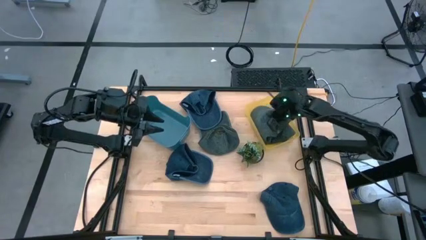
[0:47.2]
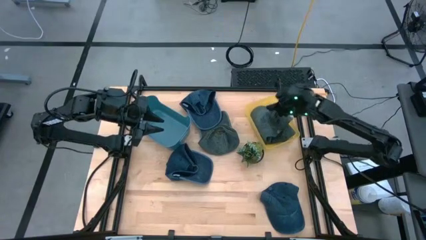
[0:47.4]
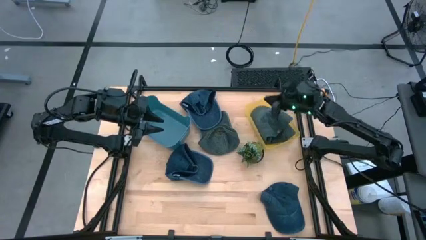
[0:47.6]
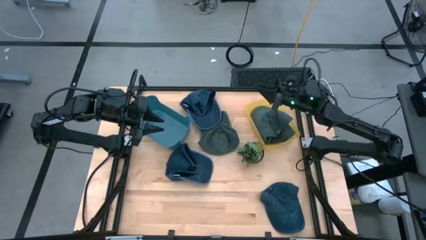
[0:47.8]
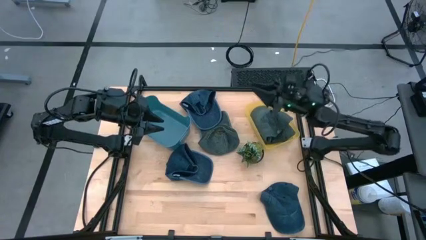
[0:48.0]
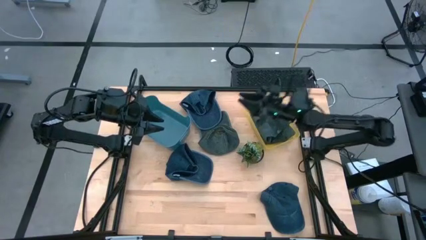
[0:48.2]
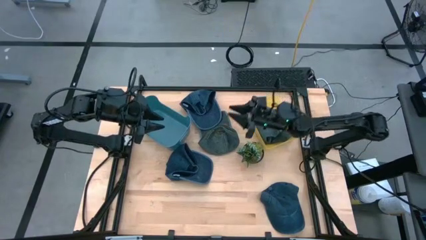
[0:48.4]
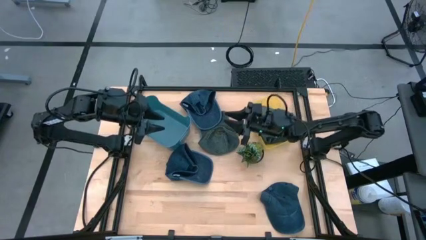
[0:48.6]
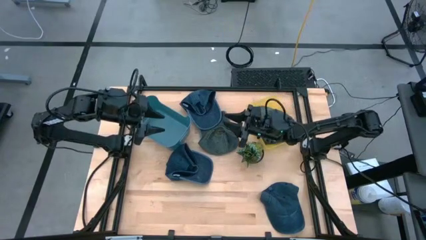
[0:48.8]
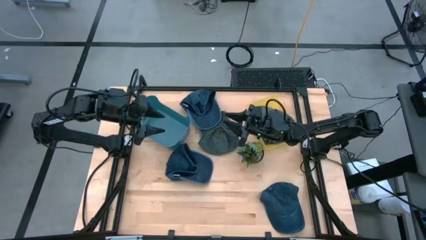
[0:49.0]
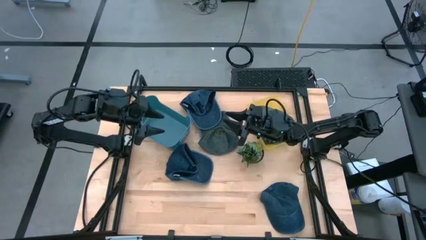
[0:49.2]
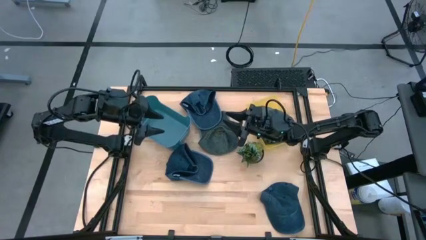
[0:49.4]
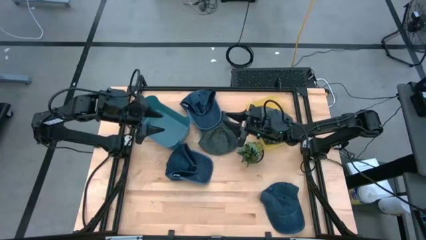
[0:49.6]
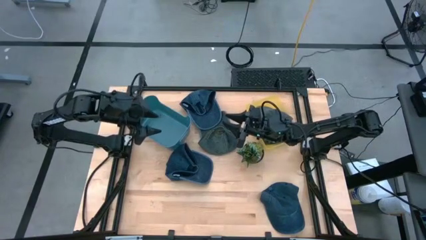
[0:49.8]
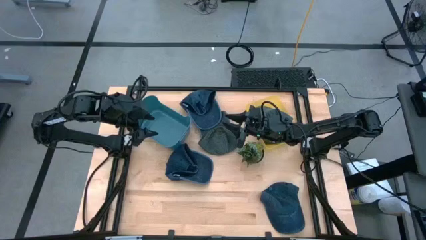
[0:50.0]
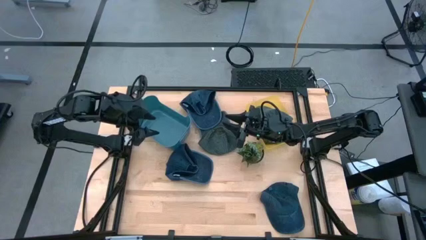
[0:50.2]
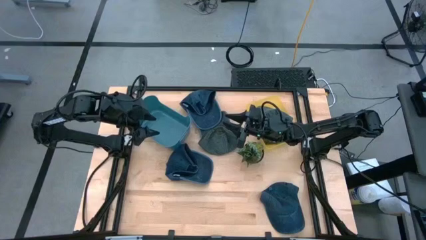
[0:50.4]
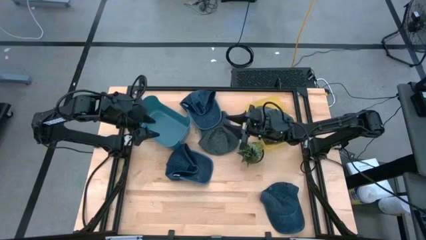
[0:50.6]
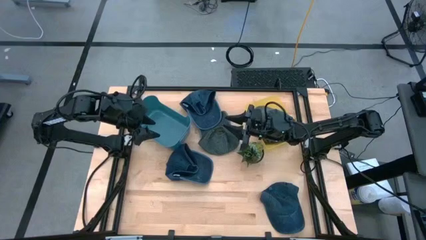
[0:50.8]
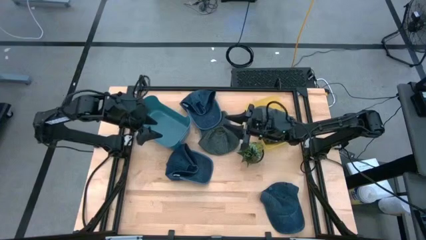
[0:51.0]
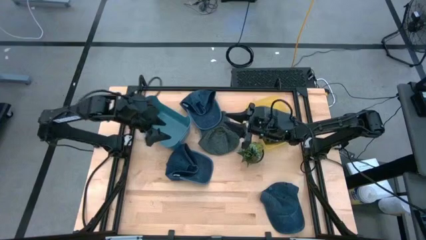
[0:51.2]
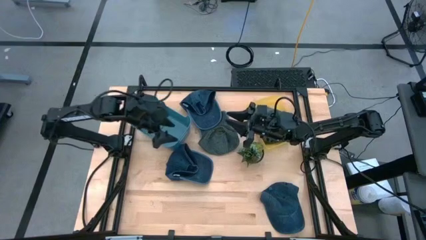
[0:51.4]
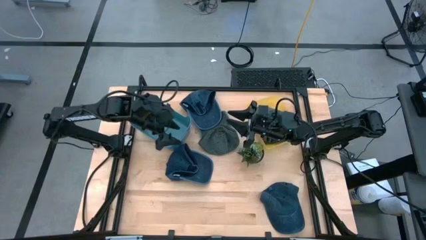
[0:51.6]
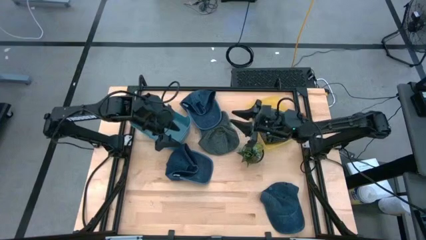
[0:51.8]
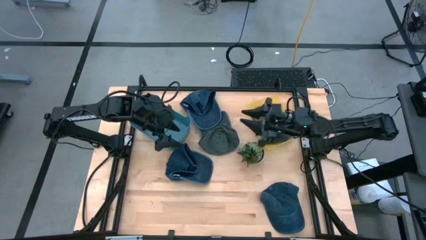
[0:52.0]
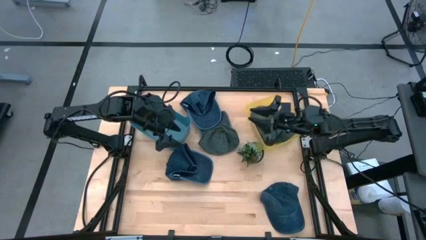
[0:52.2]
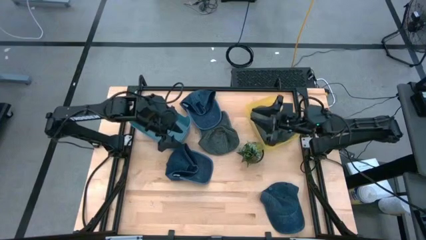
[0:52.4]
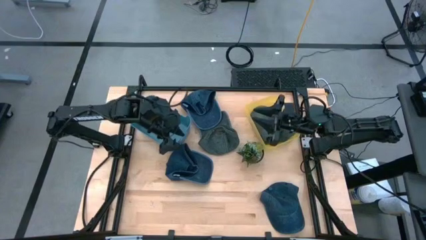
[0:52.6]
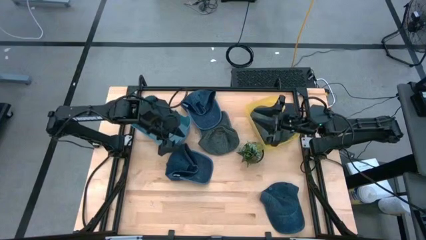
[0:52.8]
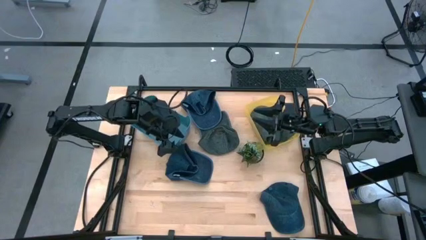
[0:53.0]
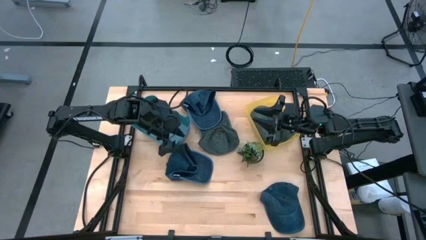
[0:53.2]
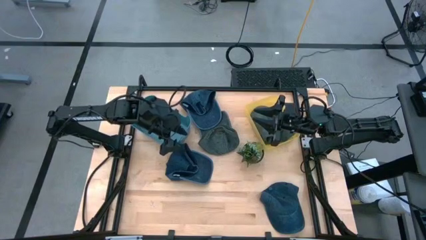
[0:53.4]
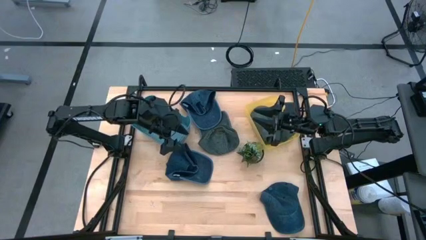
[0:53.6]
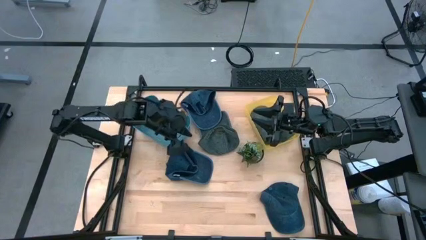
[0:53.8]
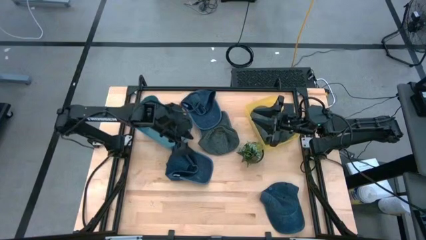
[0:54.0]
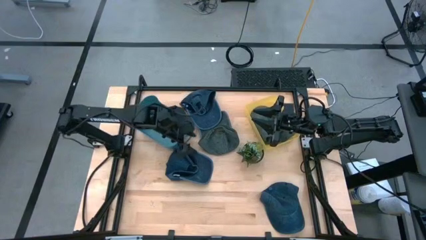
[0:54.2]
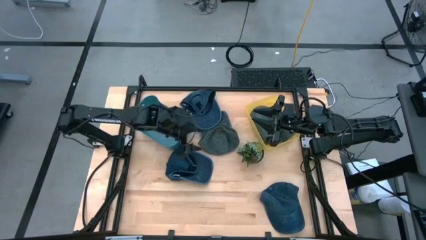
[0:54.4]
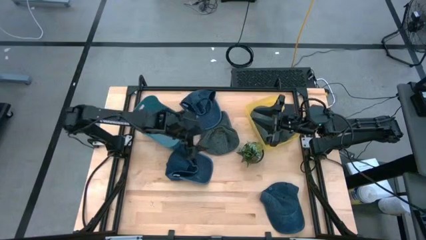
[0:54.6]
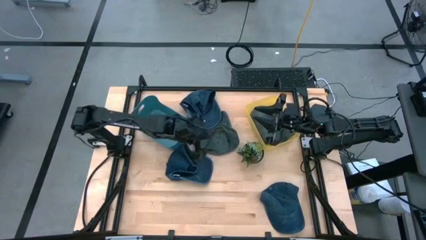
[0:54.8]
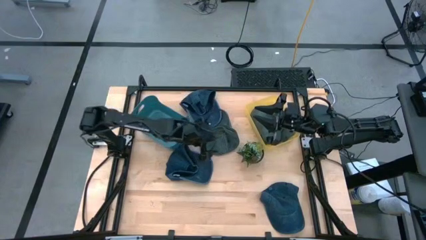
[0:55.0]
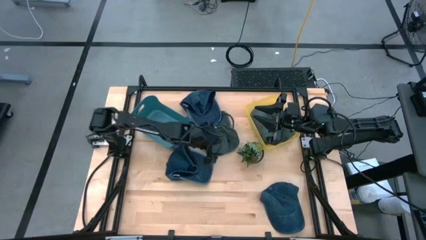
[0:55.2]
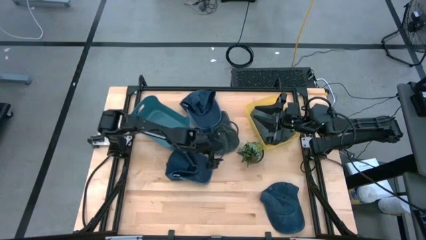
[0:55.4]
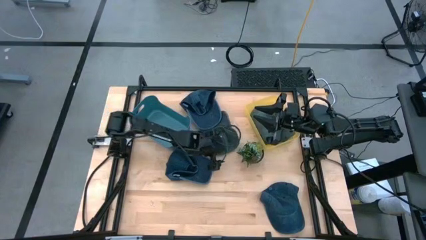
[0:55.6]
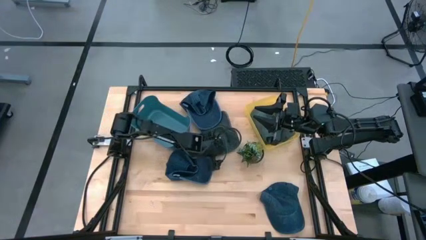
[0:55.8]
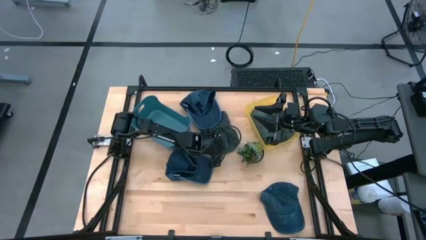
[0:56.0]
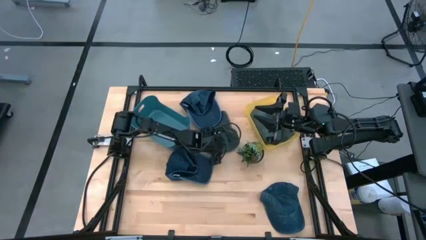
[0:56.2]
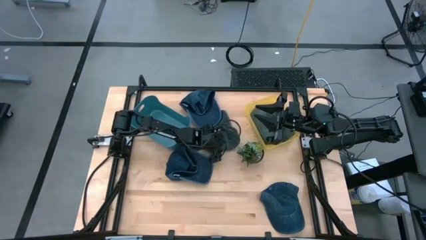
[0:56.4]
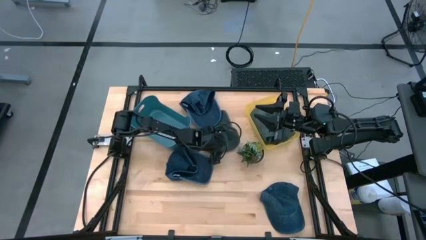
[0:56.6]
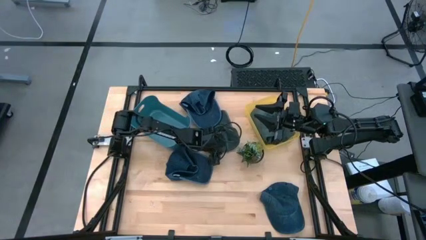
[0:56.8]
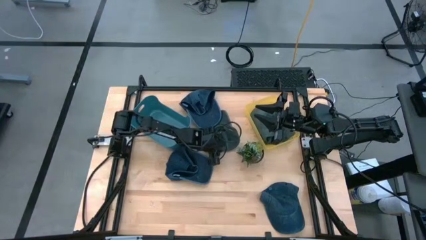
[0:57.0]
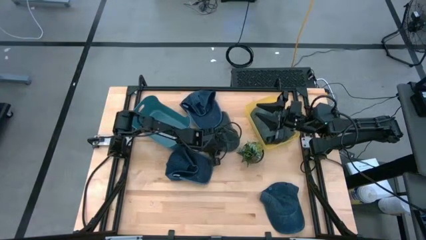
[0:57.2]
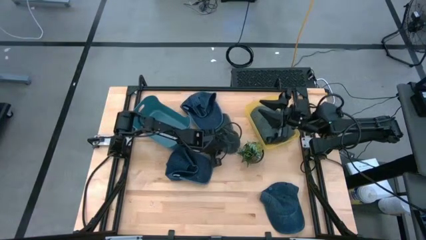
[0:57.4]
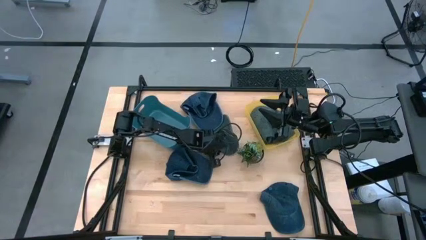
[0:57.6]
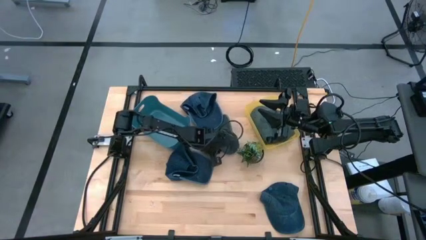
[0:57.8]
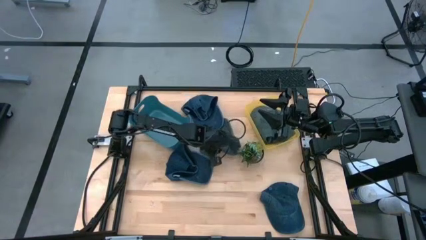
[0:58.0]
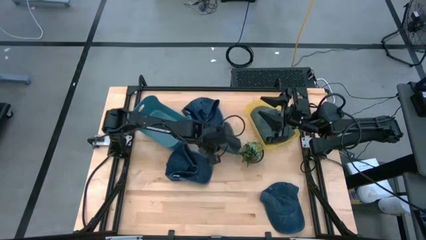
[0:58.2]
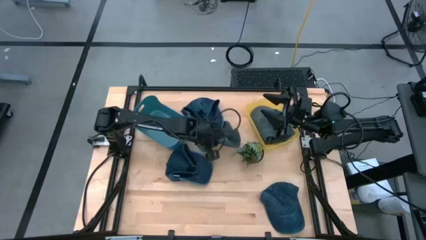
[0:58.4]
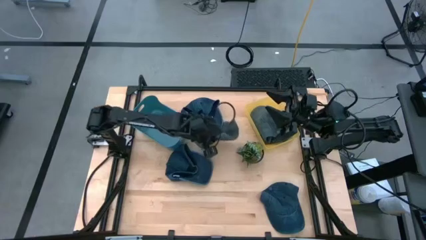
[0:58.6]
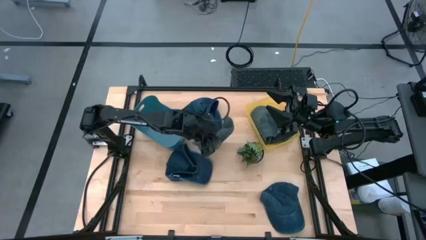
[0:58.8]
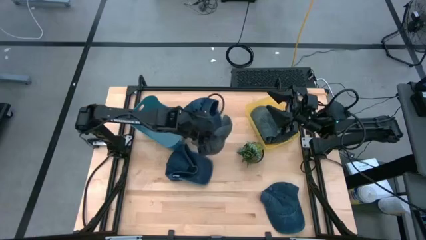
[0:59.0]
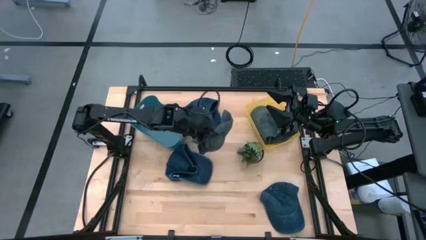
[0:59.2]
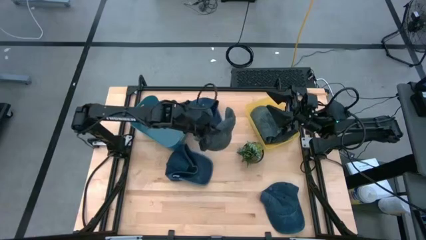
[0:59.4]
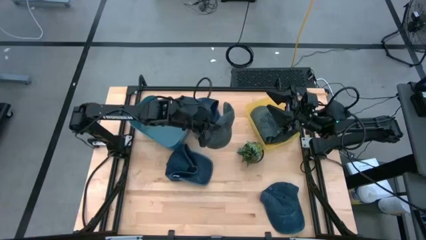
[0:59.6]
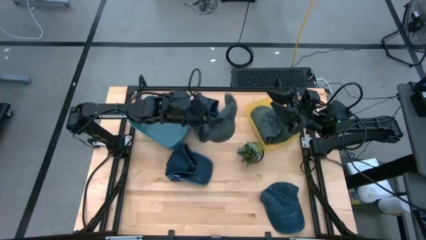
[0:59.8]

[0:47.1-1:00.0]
Task: Pick & Place hat
Put the gray cap into the yellow bin

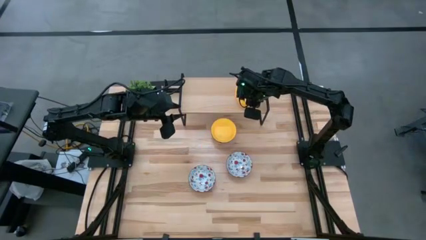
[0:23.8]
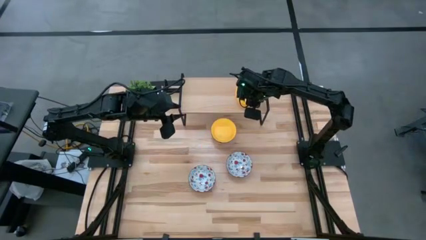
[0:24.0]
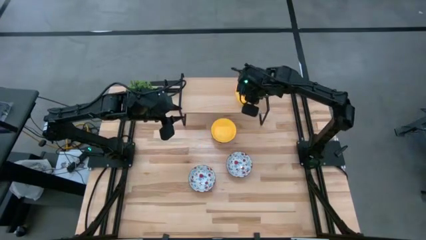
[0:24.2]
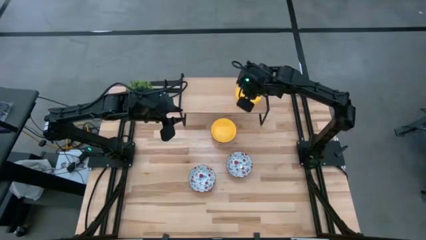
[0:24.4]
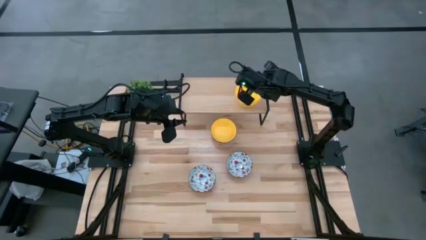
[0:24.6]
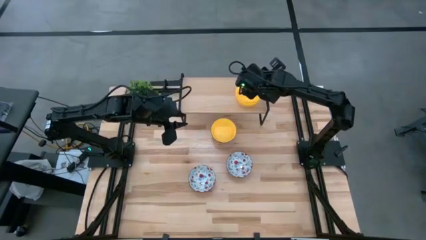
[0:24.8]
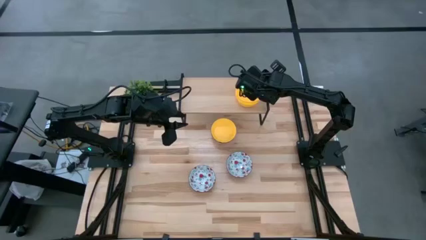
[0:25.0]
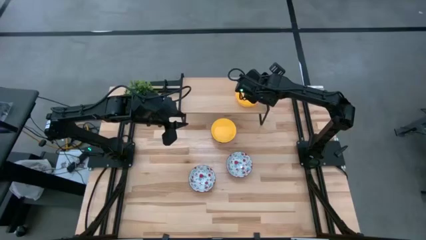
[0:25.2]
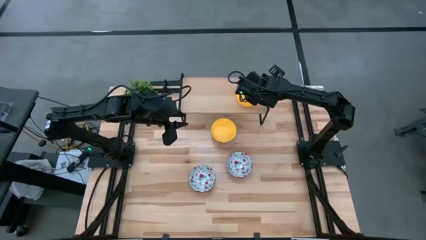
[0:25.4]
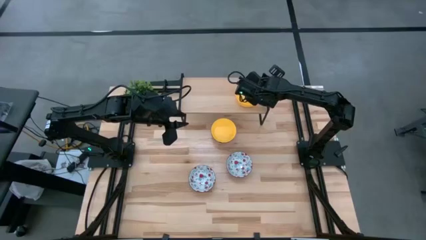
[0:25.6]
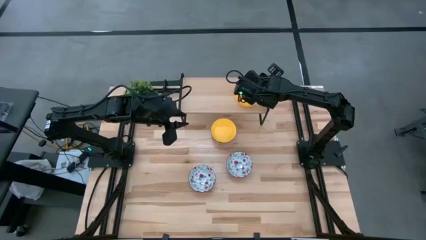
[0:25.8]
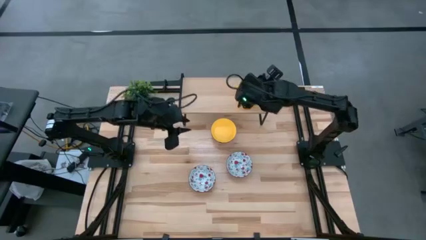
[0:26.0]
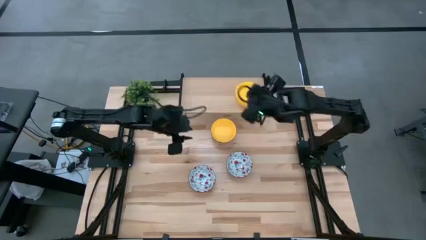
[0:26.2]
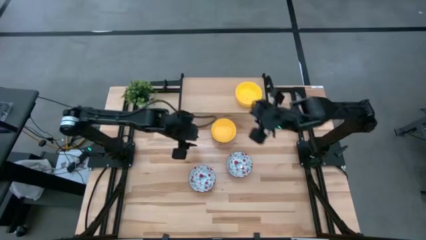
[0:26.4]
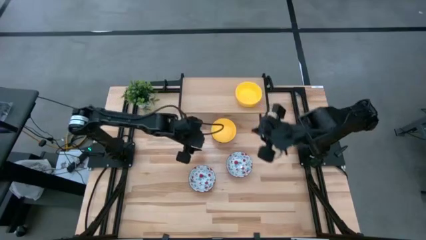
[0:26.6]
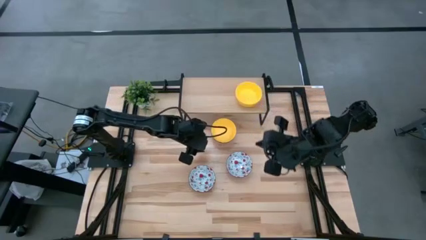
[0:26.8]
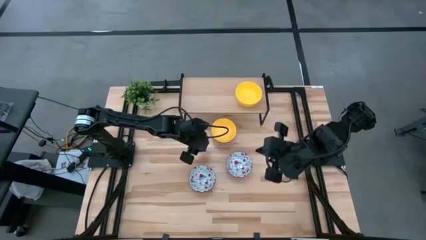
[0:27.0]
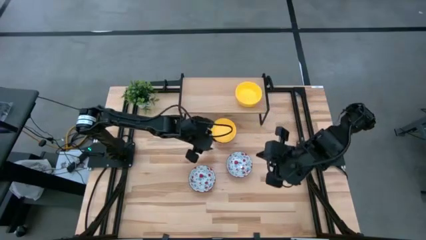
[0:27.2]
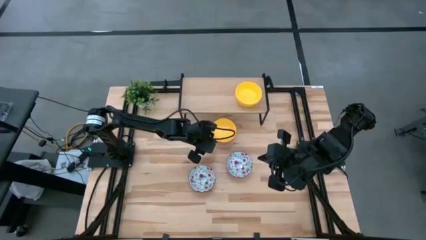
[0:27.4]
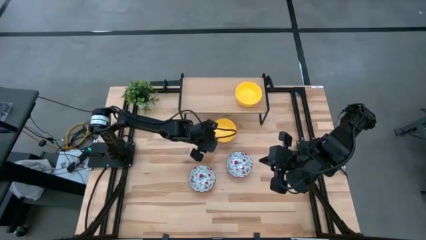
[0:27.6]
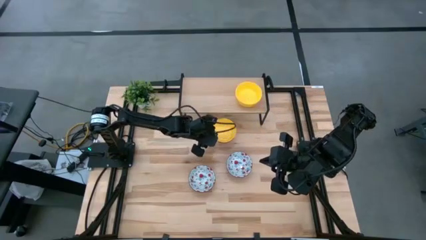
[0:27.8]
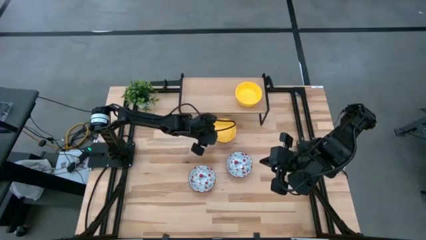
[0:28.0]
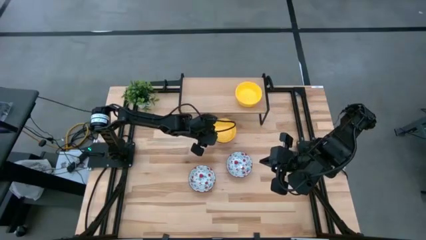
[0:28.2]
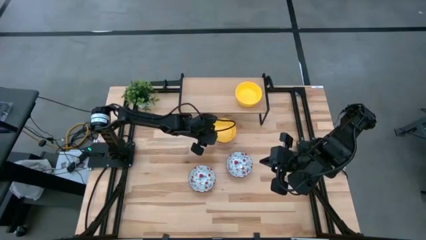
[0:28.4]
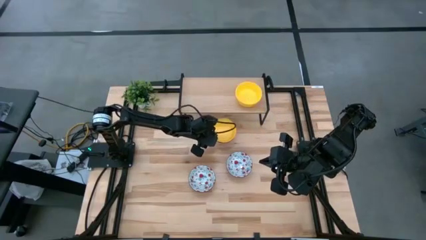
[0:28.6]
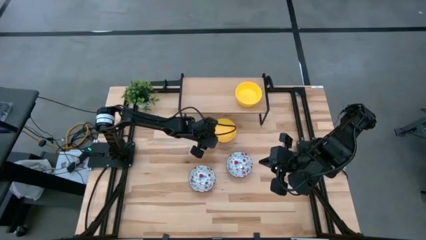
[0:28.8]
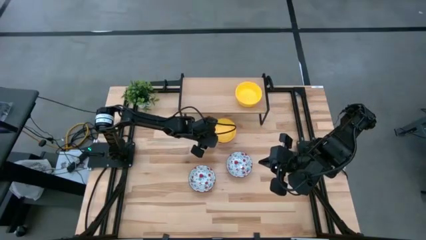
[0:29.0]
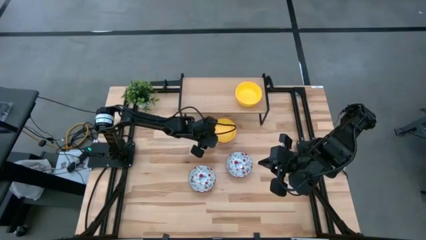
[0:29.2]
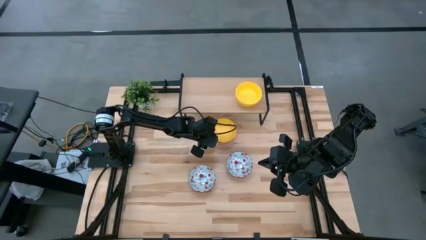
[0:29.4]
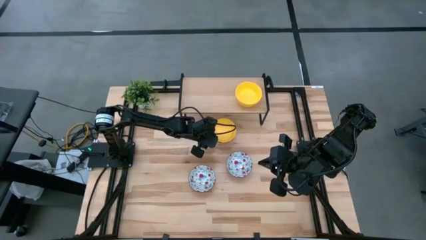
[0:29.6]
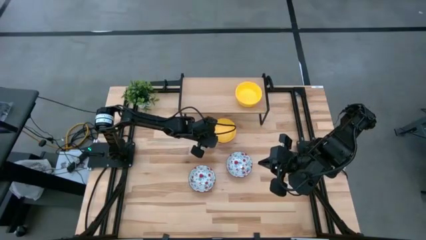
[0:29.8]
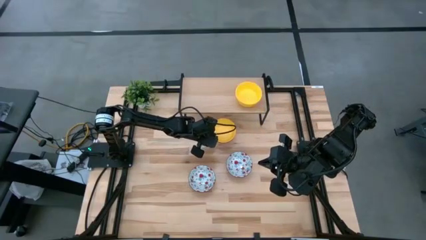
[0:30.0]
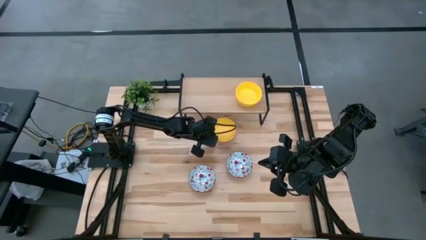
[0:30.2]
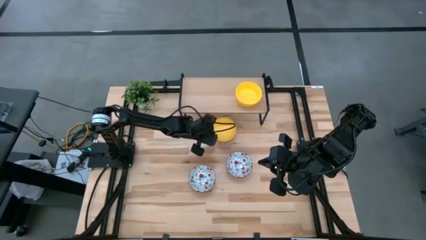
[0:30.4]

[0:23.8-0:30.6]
Task: Pick & Place Mini bowls
Stack the yellow bowl on the yellow bowl on the shelf
